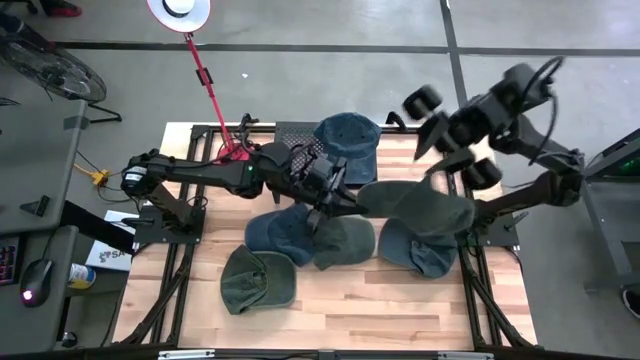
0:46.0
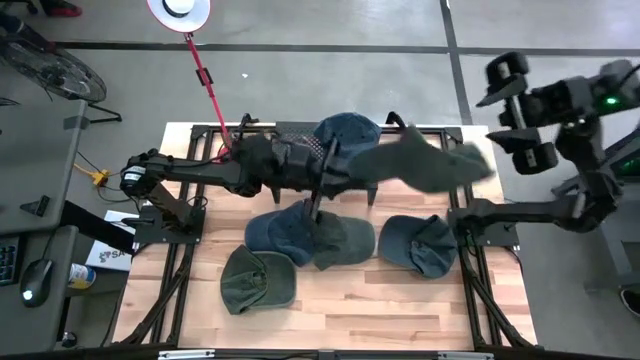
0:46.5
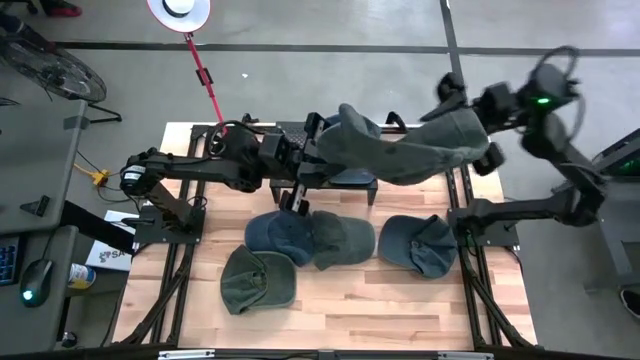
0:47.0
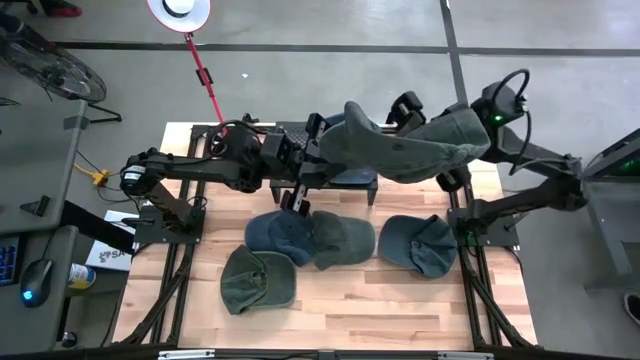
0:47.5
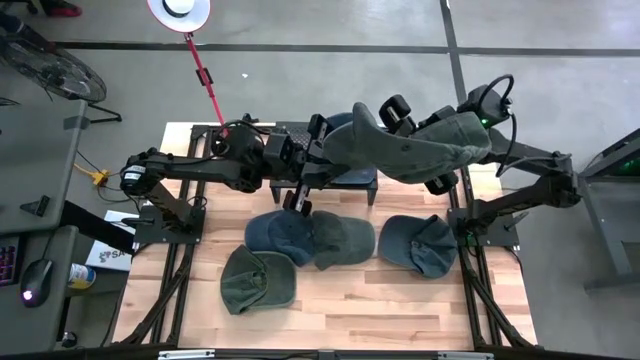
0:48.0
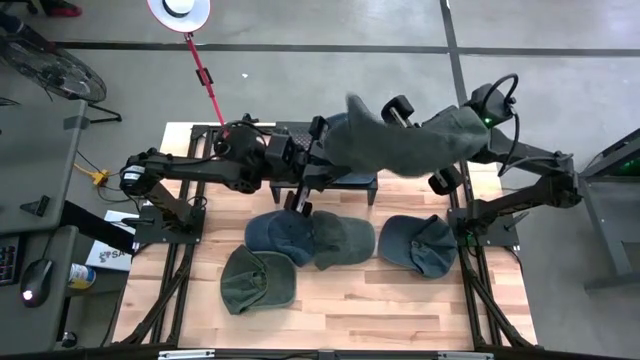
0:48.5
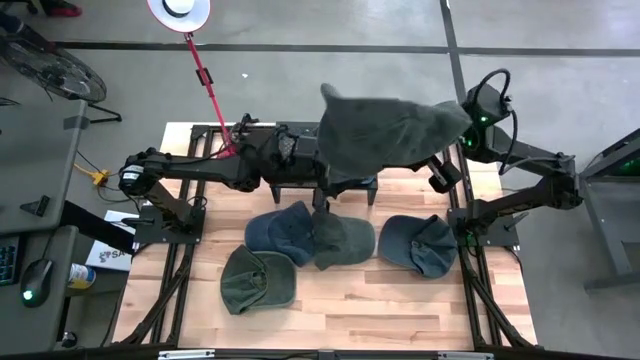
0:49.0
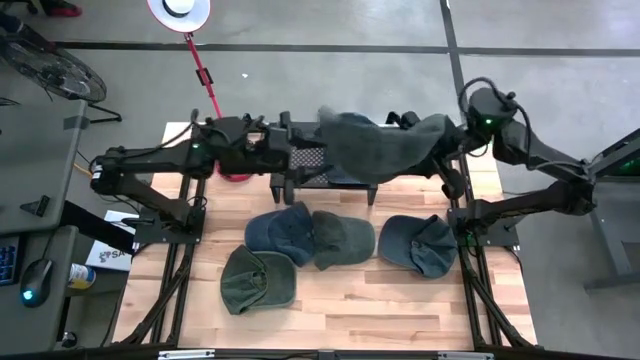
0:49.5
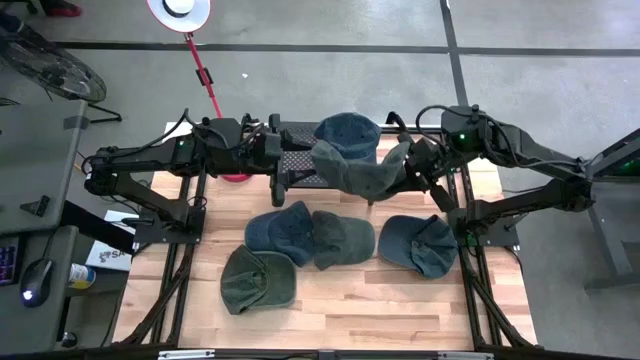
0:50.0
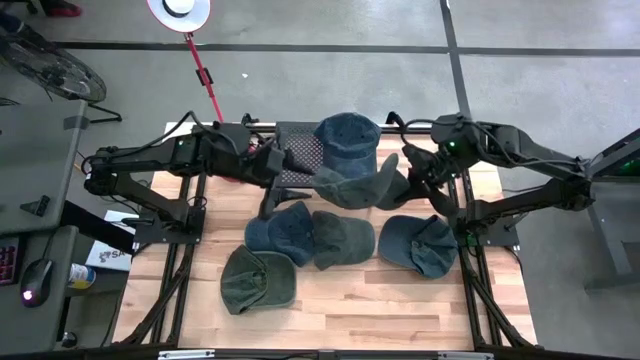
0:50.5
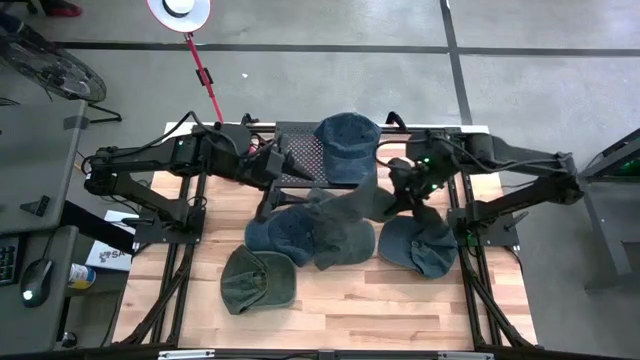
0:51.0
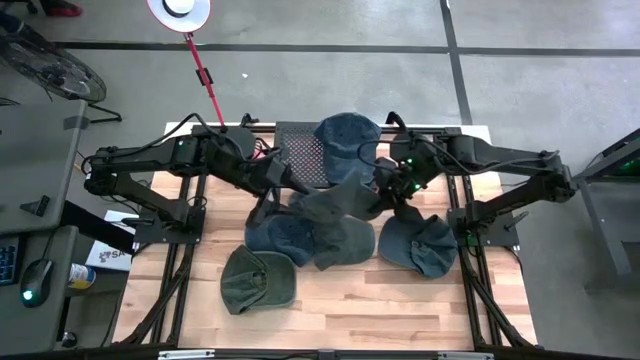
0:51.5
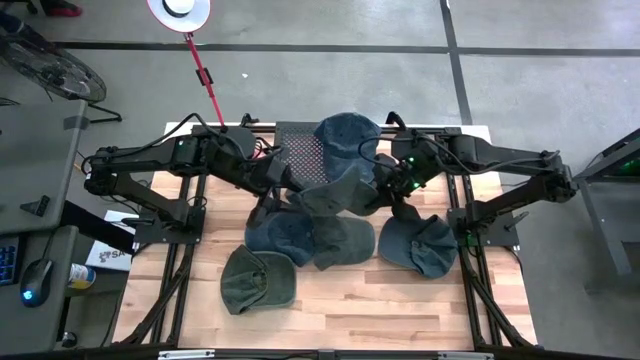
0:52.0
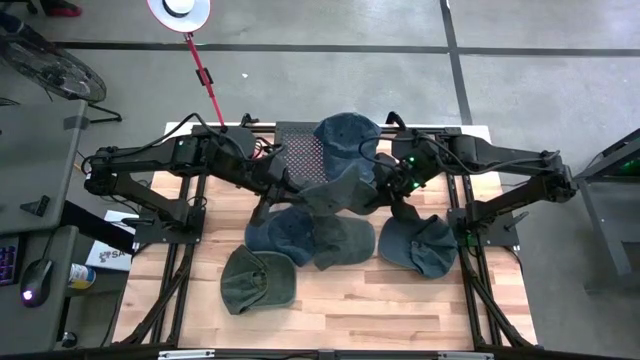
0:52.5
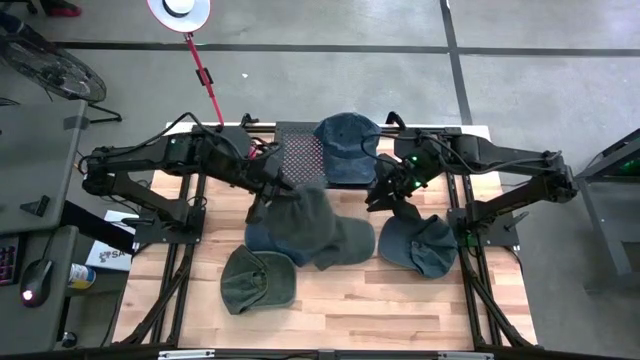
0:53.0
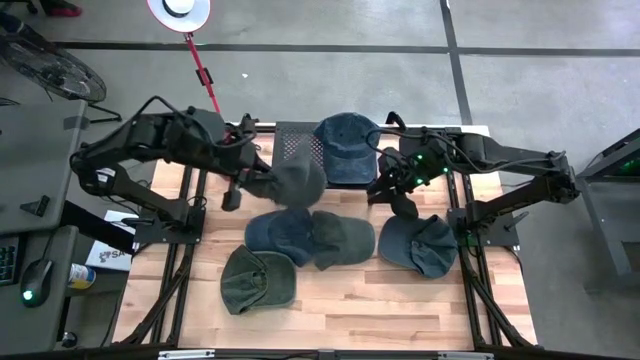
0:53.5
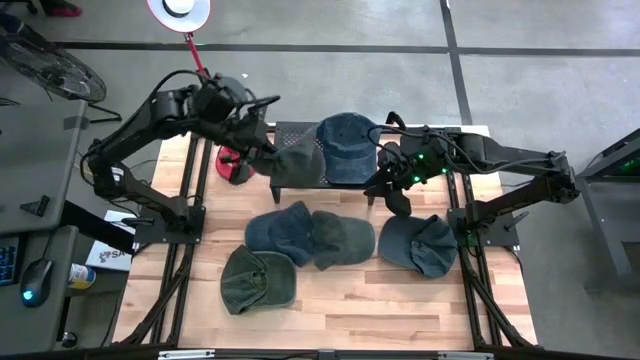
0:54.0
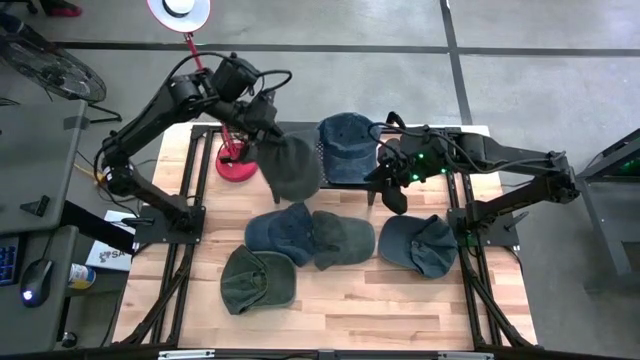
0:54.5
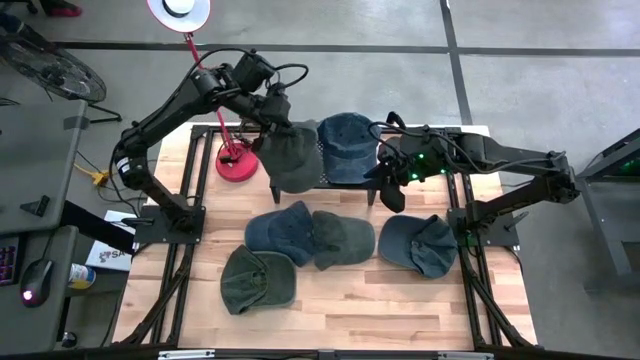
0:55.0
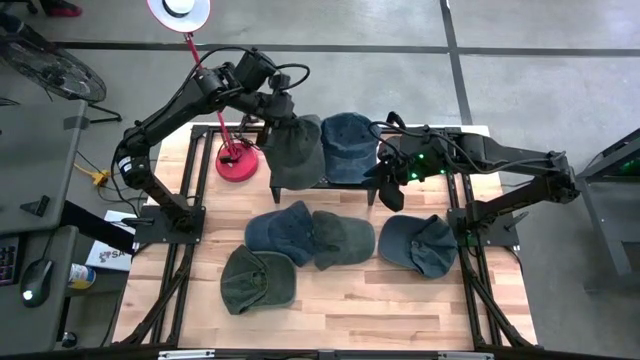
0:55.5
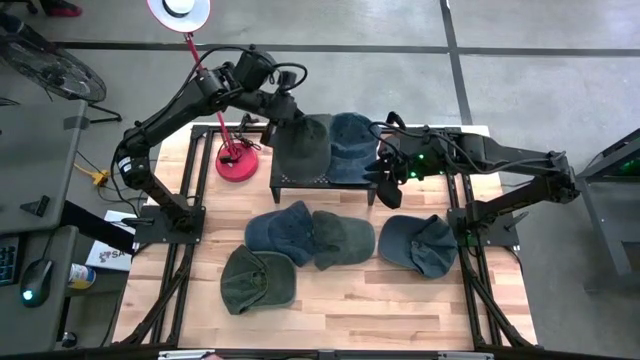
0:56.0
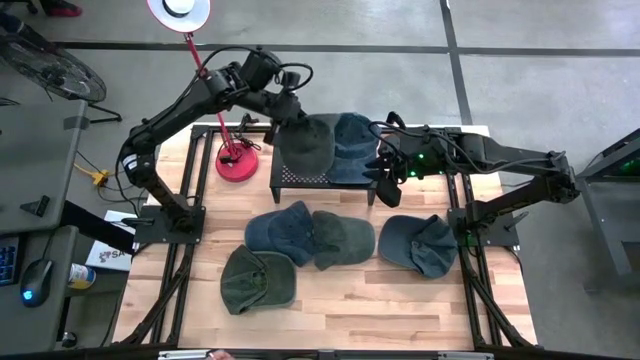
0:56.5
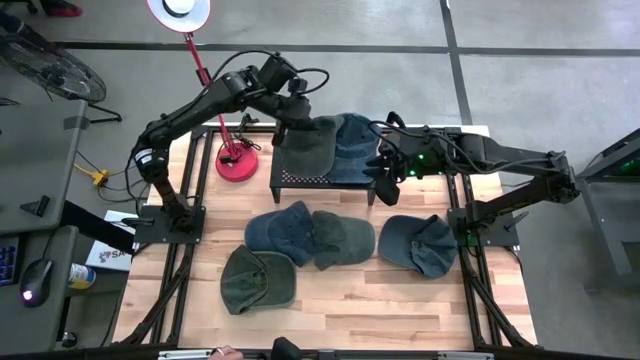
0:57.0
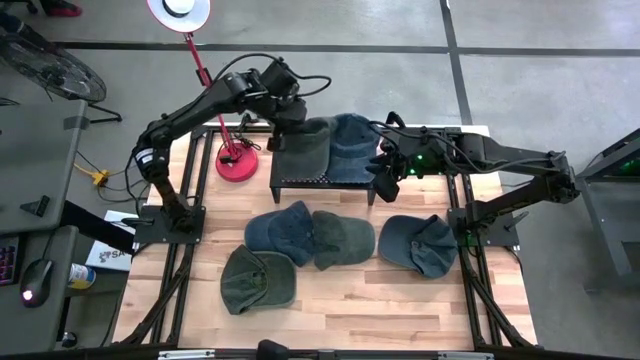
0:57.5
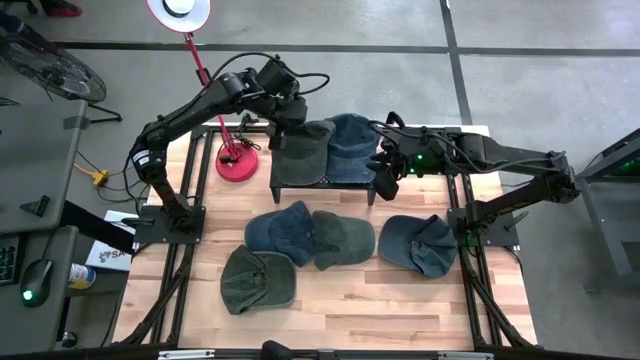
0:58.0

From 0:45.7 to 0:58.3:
Task: Pick & Place hat
Put the bottom right gray cap to the left of the blue cap on the shelf

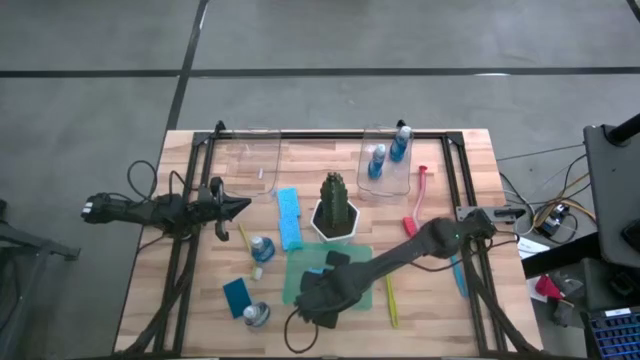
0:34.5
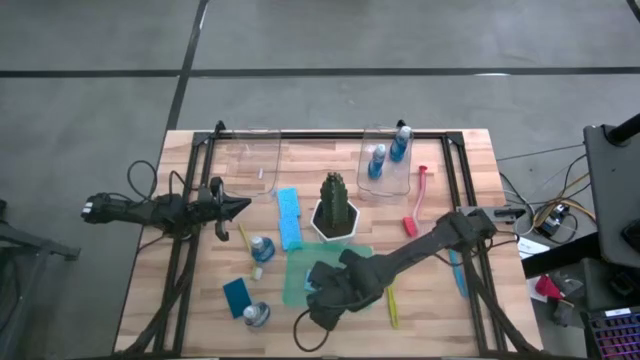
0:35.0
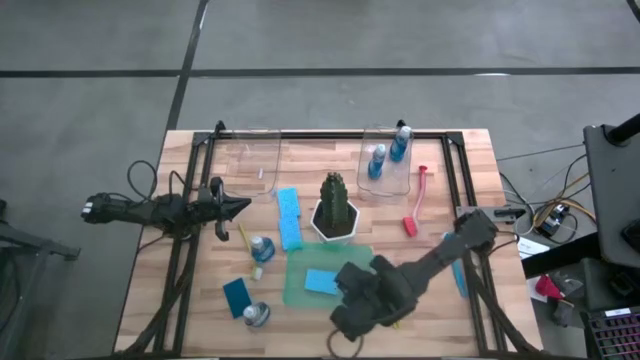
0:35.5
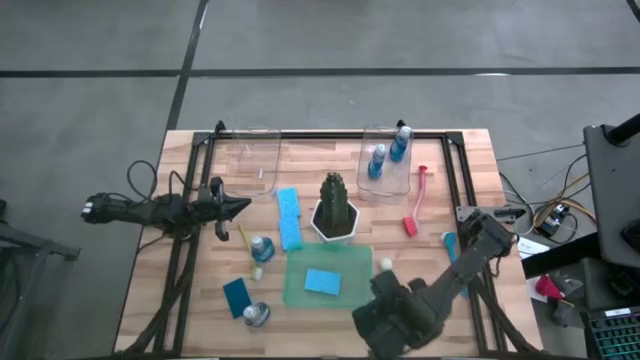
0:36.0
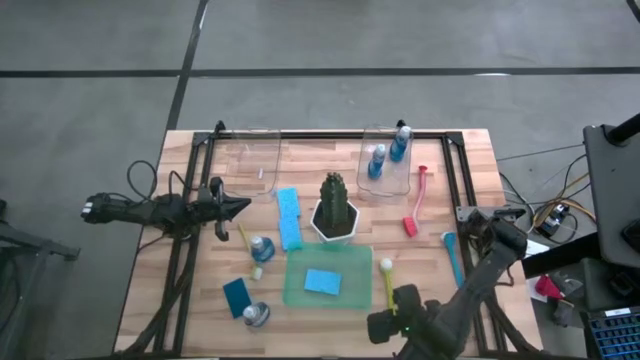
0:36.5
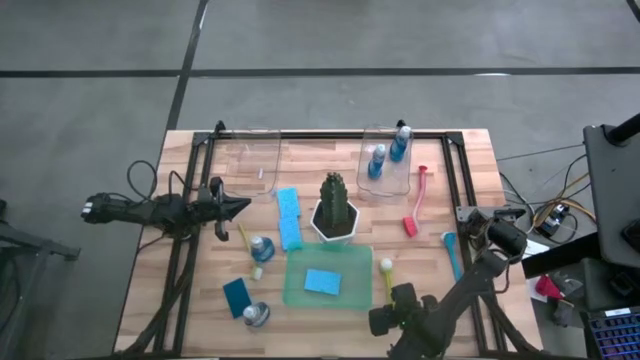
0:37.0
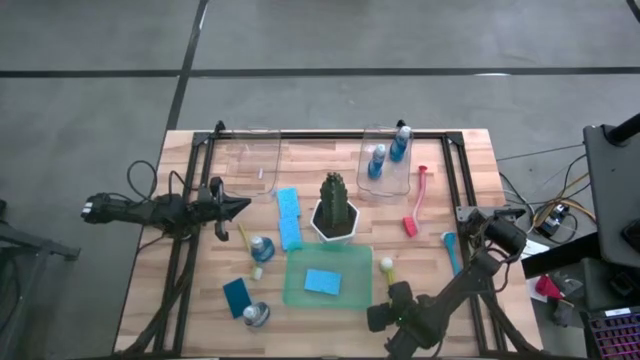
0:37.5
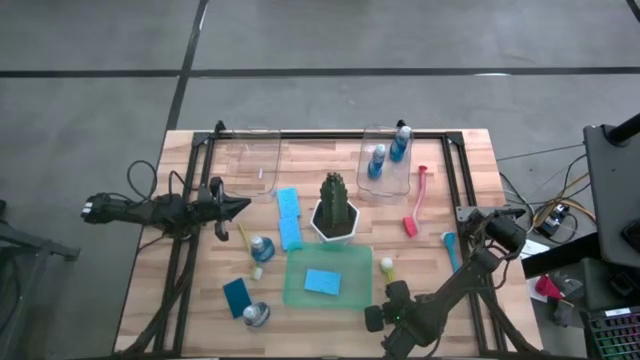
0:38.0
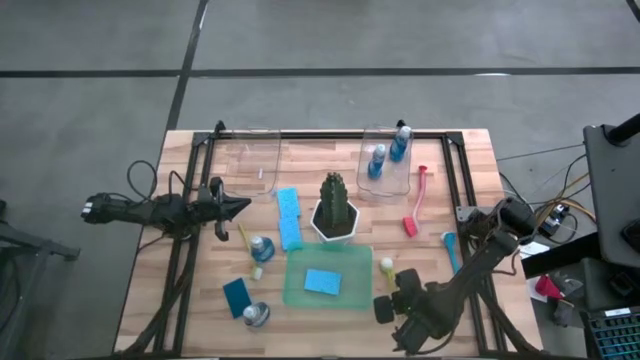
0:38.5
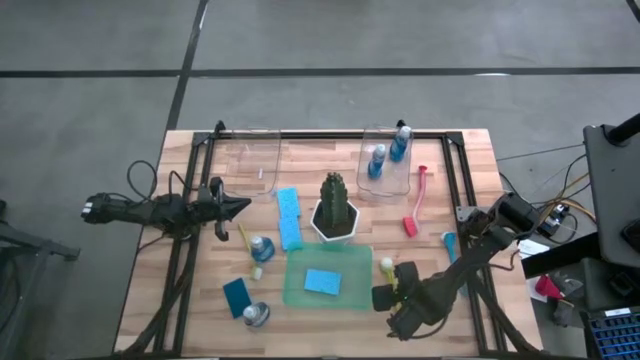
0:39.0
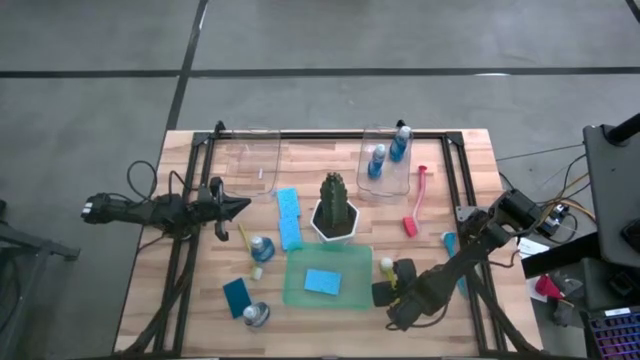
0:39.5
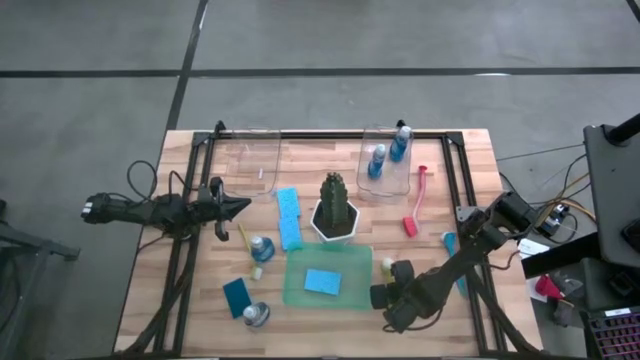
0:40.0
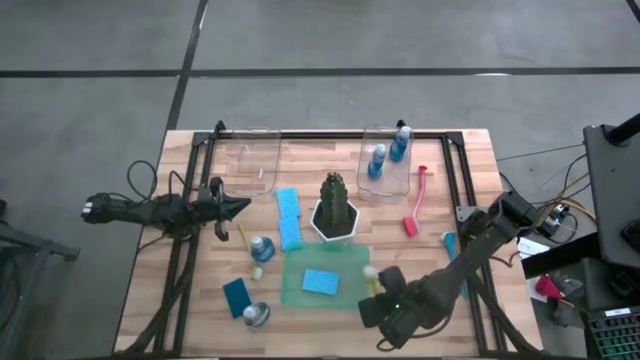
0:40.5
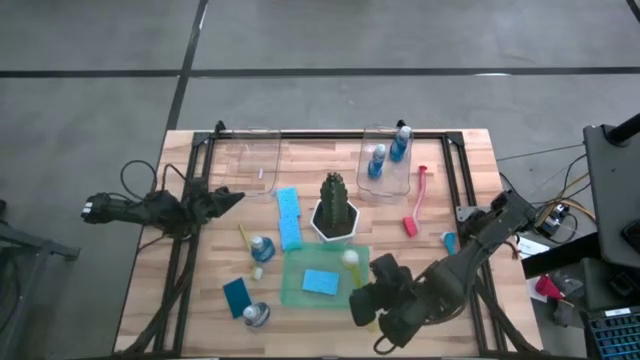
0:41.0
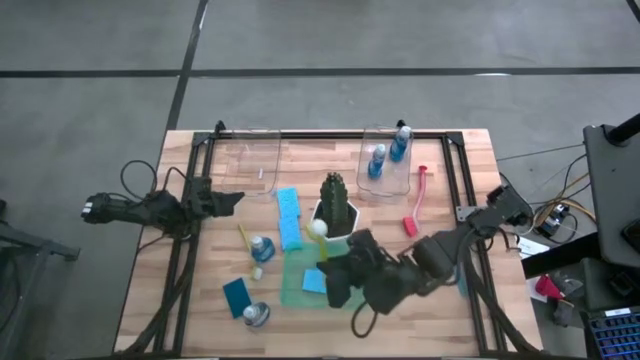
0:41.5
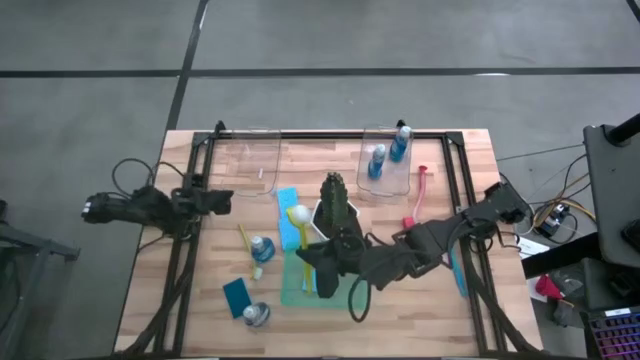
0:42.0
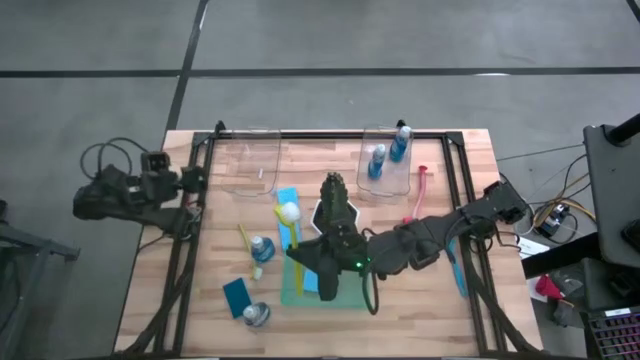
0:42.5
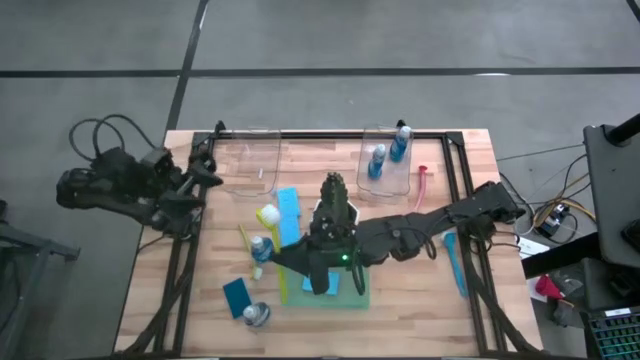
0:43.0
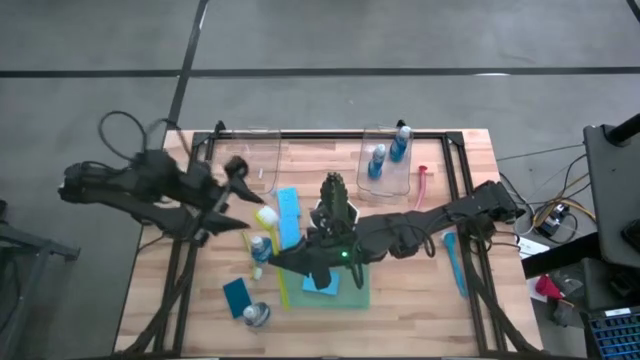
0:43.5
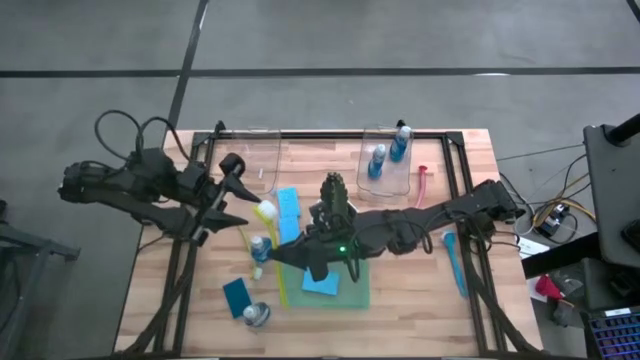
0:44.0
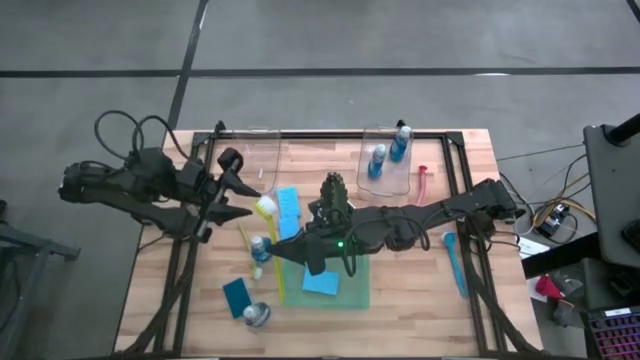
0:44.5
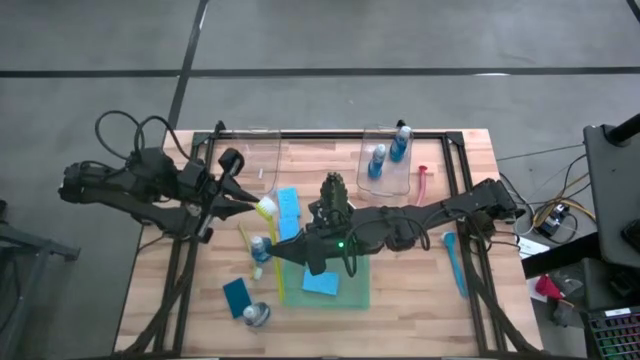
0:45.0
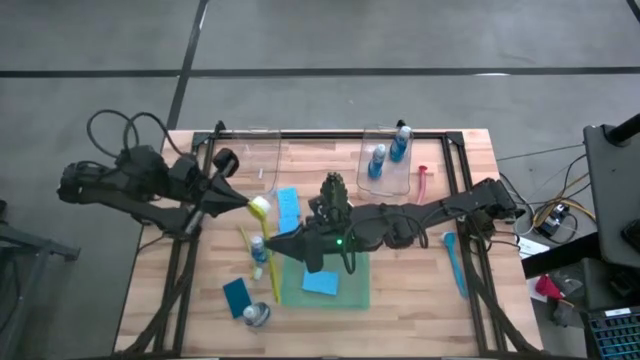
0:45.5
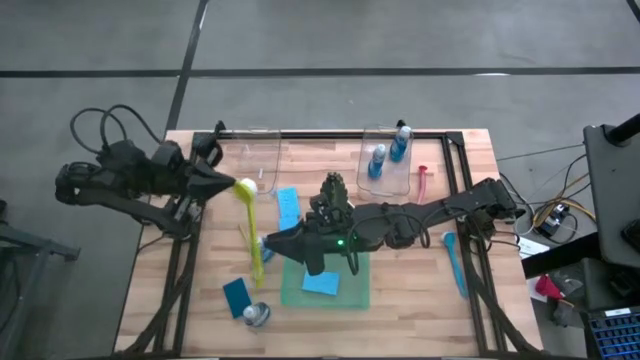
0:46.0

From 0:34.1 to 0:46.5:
Task: Pick & Place Kitchen Sink Supplies
Put the right green dish brush into the left transparent bin
